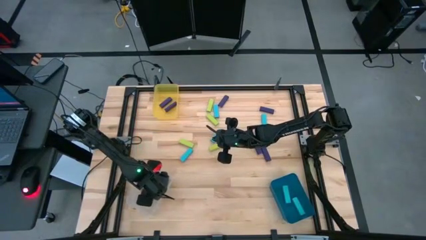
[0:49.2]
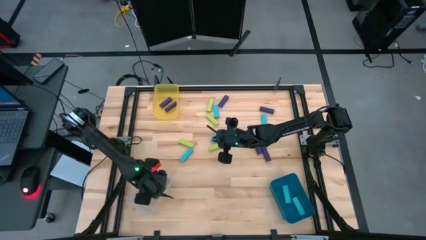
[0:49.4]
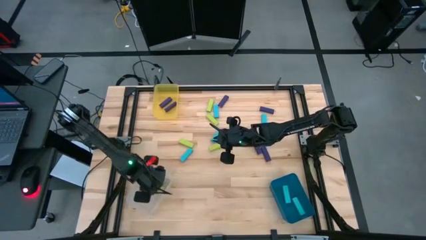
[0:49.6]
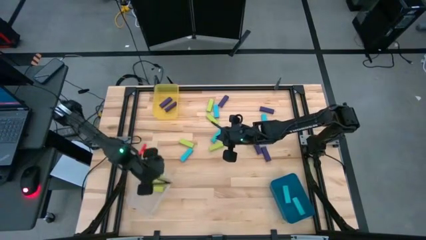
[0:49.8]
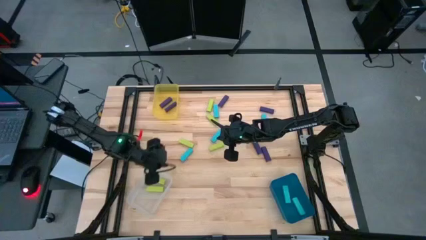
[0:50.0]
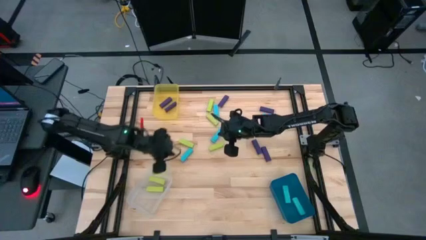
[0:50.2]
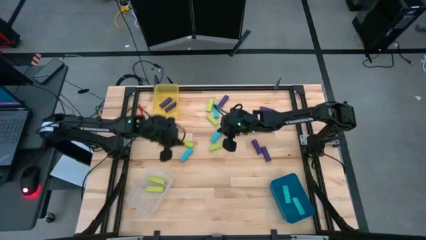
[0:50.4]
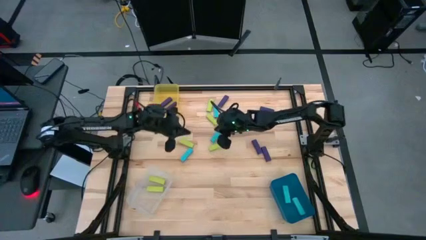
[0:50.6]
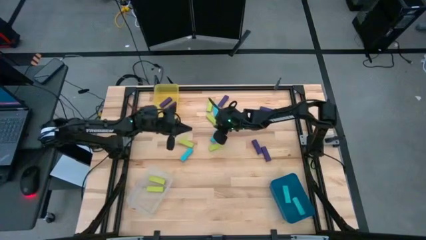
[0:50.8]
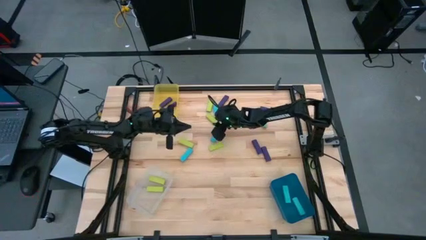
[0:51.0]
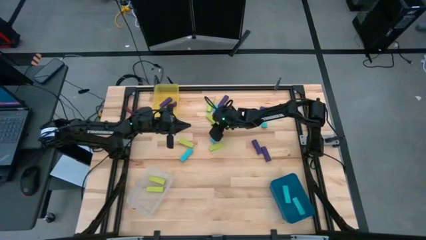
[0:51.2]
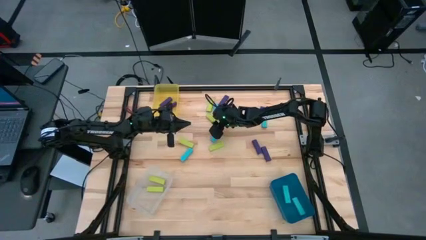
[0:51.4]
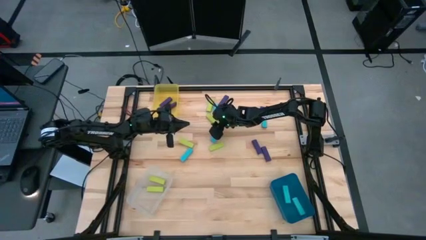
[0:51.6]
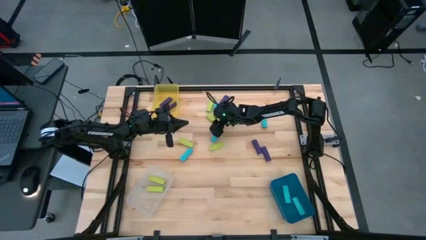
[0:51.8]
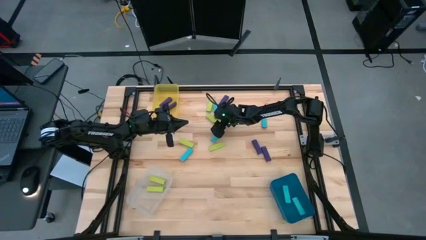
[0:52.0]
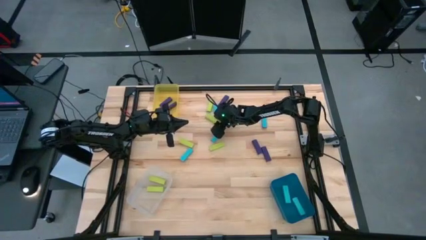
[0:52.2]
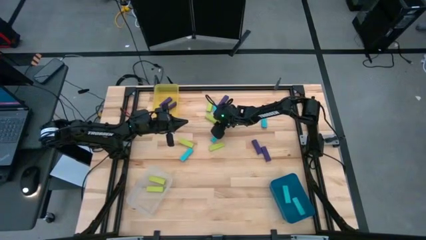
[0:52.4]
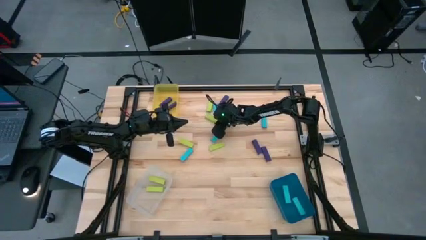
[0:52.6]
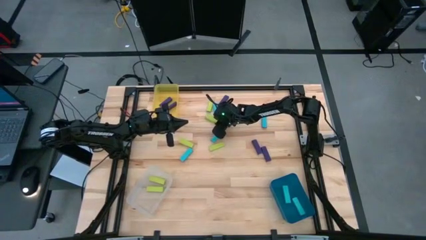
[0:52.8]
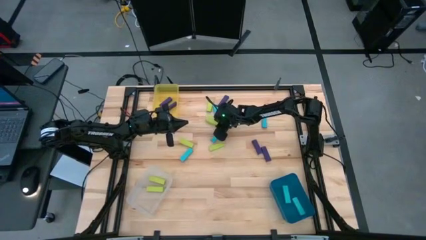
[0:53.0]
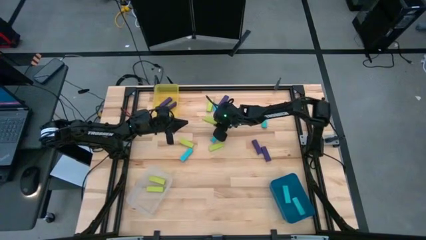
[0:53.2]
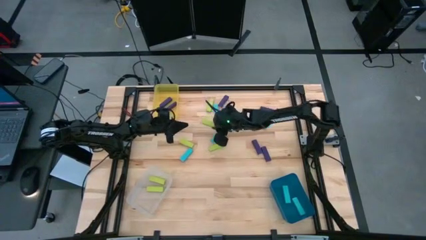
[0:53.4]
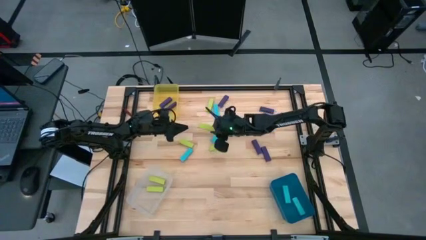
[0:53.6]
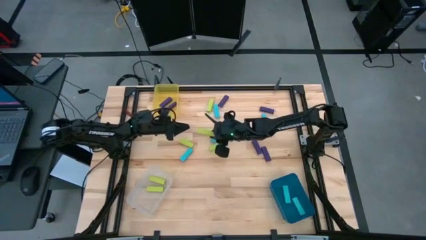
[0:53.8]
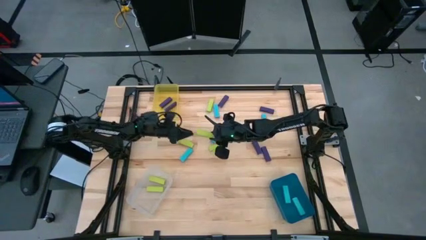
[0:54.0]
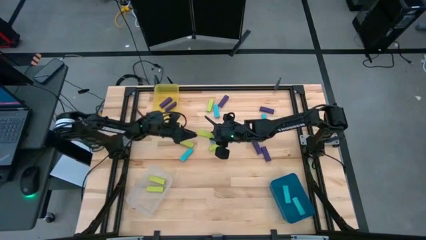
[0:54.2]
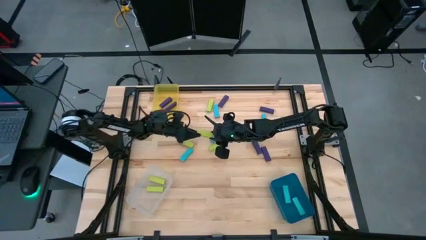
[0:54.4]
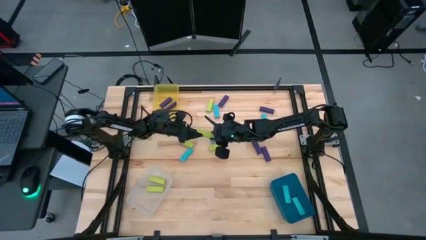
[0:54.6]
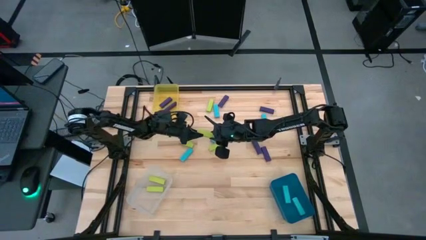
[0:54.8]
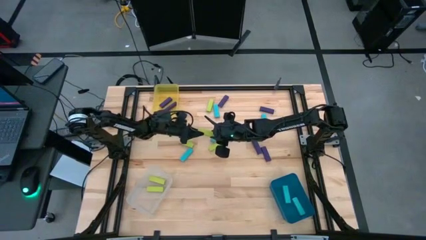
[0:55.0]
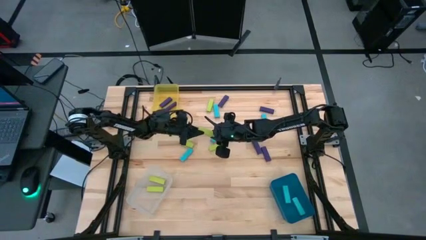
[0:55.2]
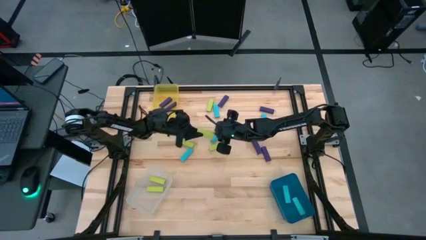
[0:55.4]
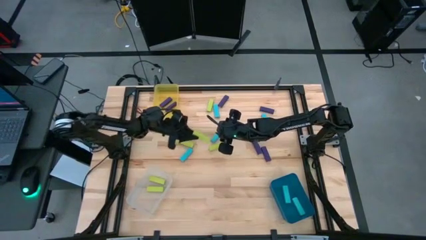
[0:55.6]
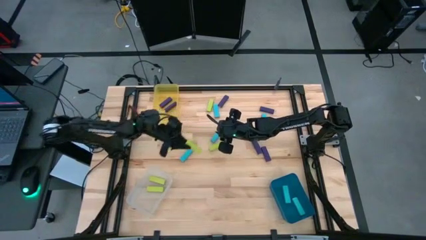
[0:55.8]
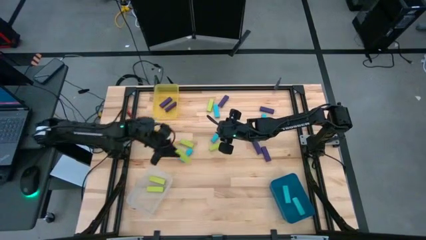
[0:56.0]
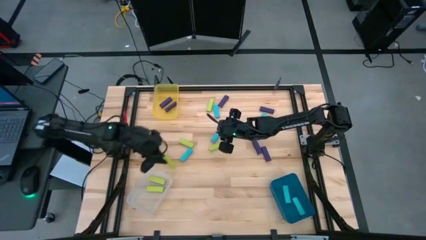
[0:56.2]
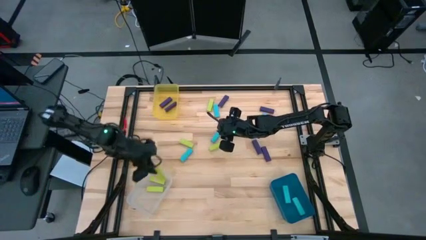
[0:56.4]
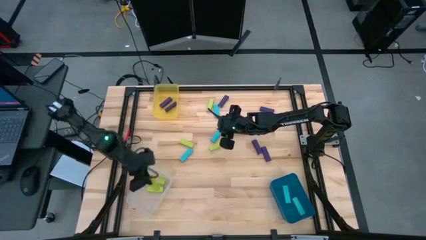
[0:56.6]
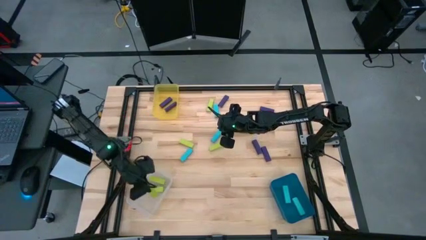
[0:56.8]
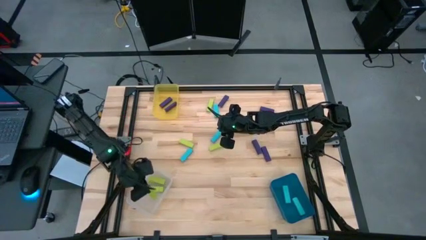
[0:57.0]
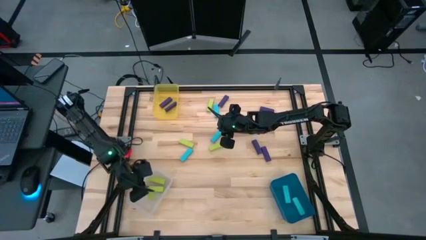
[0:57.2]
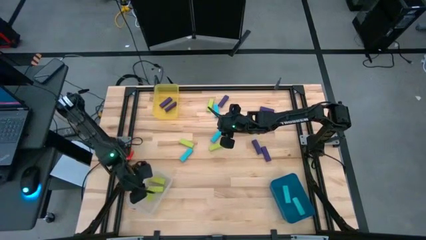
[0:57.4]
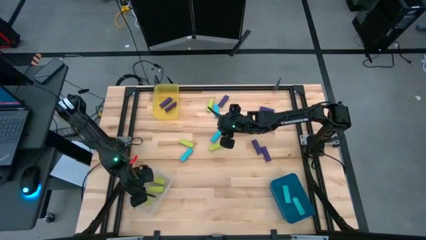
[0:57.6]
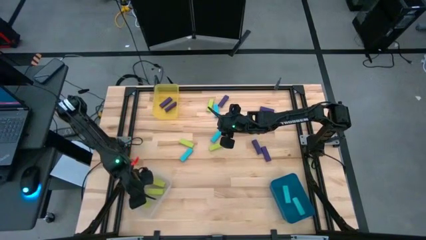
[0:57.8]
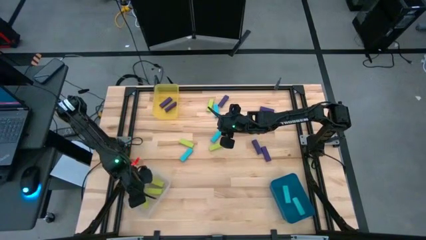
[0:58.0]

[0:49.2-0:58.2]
Task: Sort blocks
Put the green block into the transparent bin

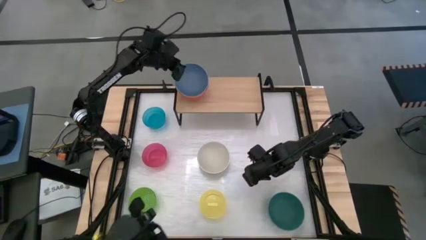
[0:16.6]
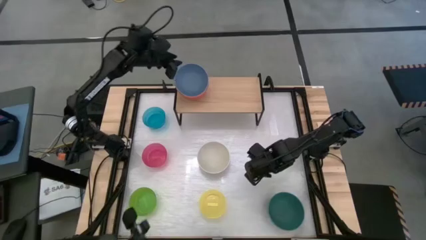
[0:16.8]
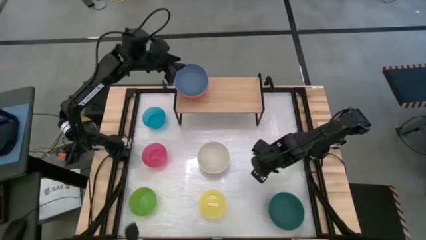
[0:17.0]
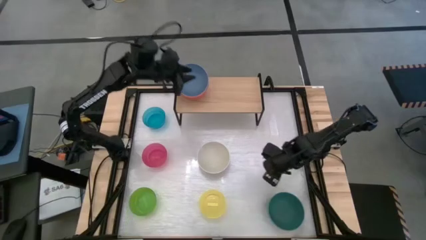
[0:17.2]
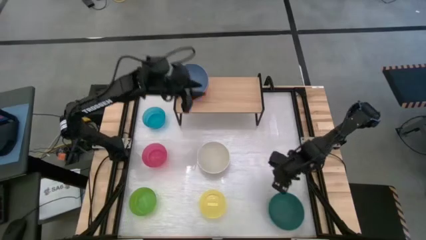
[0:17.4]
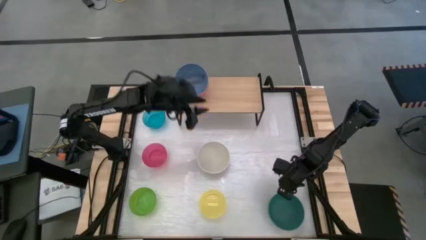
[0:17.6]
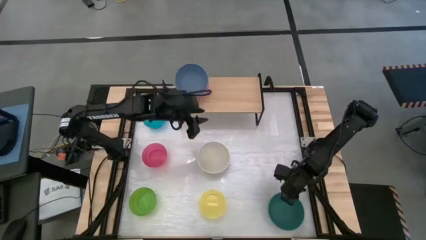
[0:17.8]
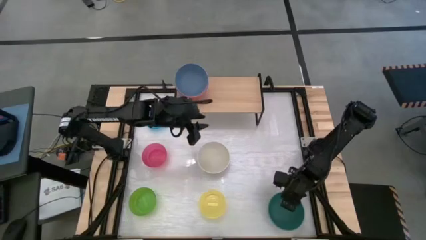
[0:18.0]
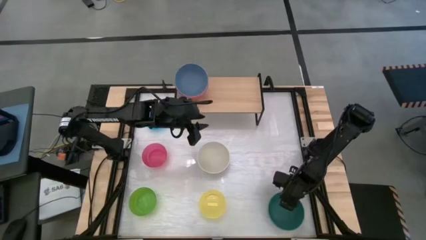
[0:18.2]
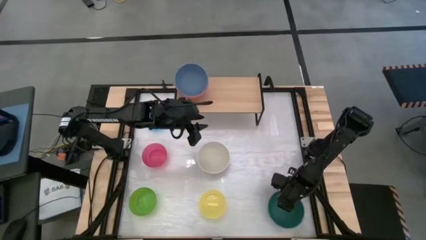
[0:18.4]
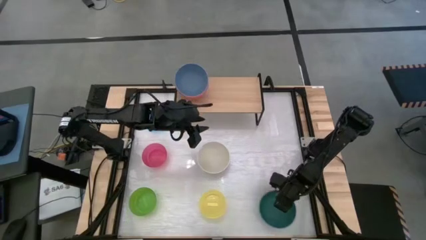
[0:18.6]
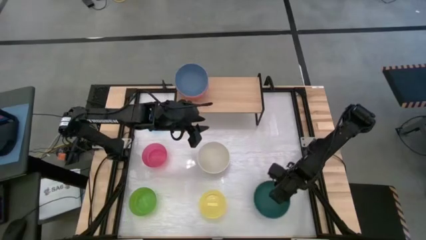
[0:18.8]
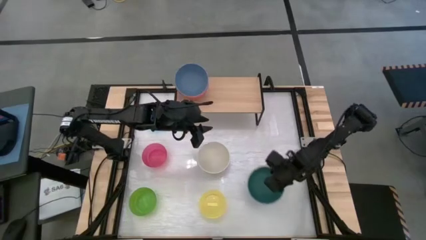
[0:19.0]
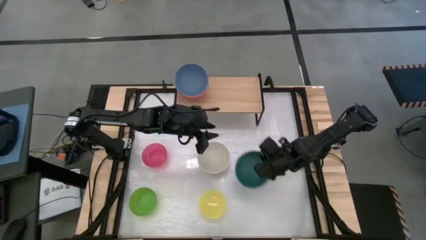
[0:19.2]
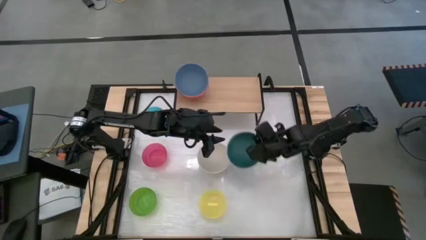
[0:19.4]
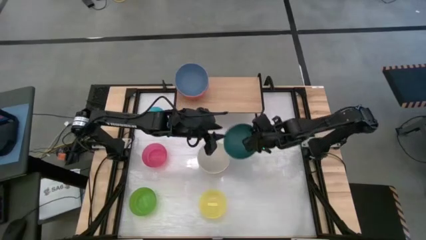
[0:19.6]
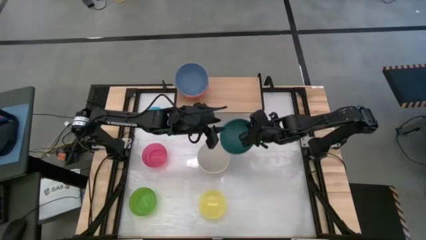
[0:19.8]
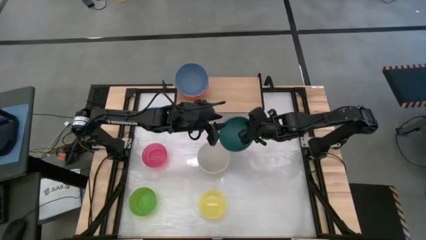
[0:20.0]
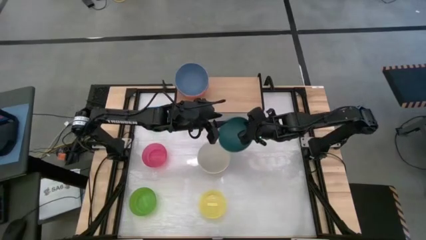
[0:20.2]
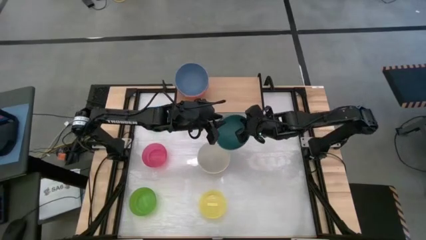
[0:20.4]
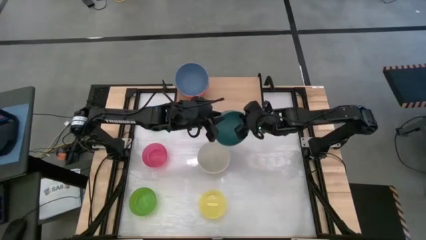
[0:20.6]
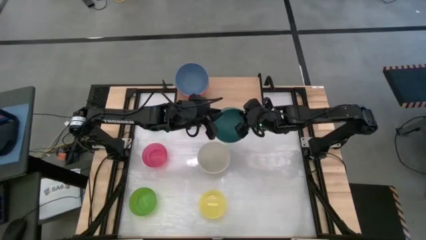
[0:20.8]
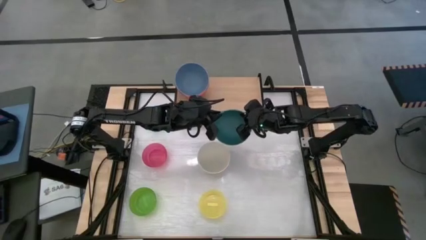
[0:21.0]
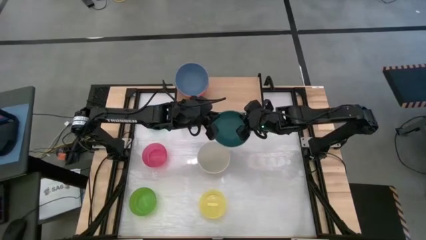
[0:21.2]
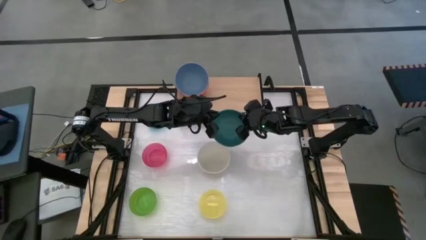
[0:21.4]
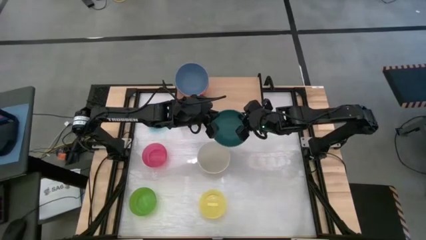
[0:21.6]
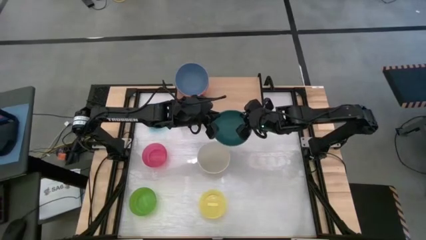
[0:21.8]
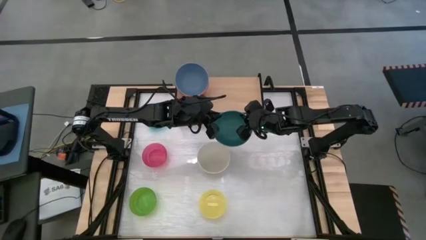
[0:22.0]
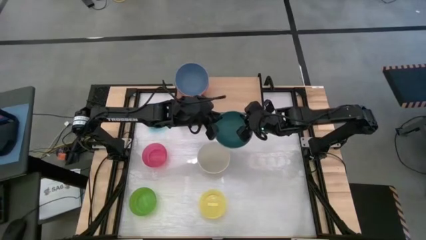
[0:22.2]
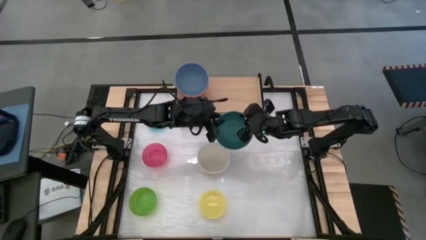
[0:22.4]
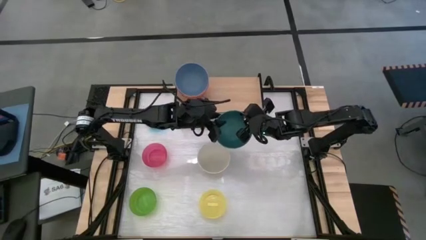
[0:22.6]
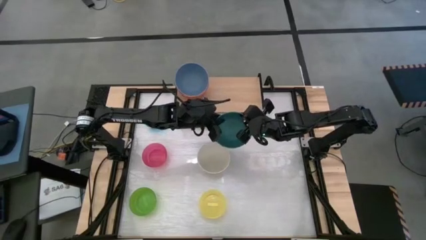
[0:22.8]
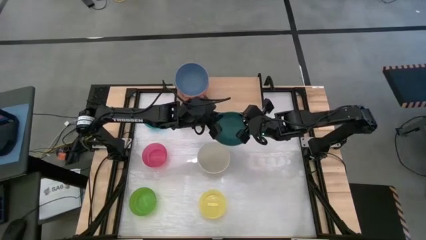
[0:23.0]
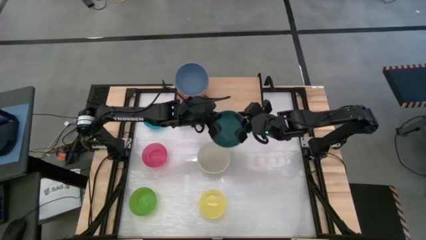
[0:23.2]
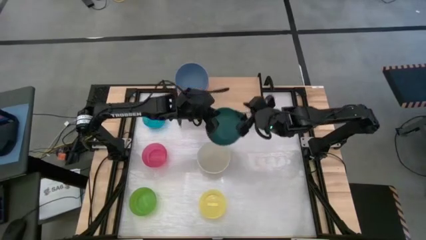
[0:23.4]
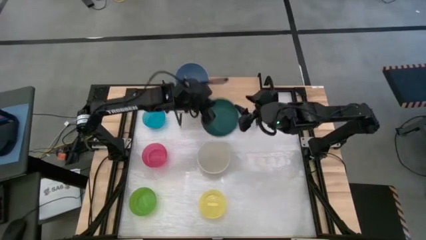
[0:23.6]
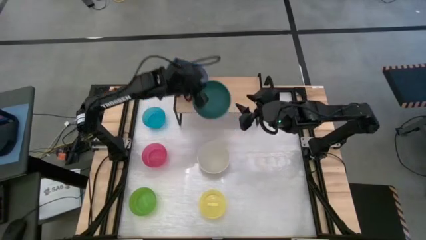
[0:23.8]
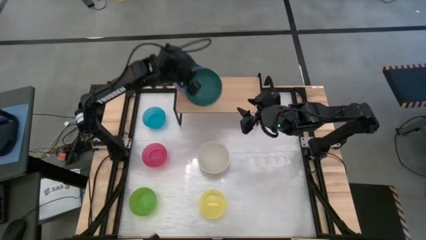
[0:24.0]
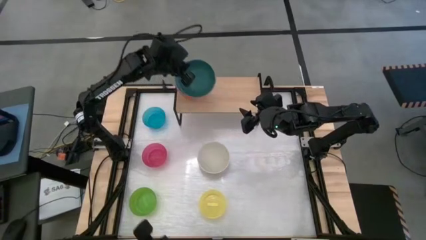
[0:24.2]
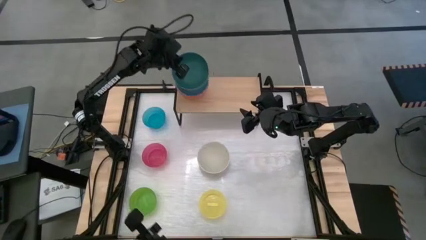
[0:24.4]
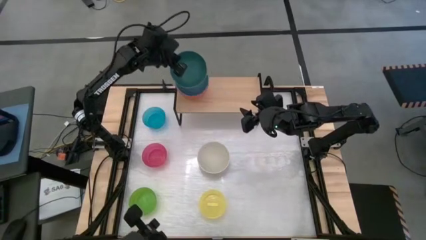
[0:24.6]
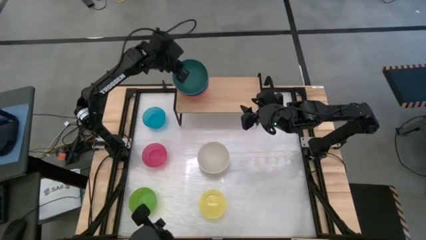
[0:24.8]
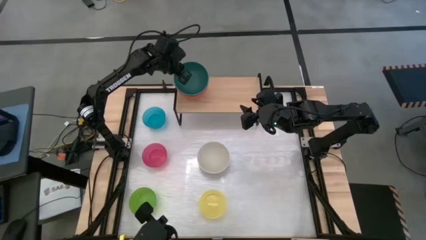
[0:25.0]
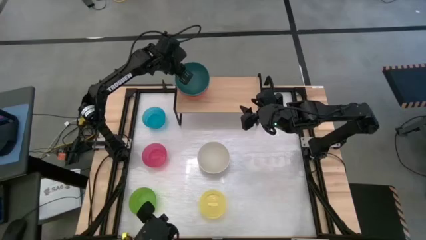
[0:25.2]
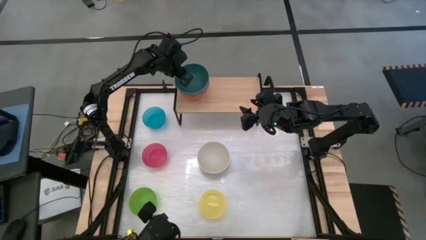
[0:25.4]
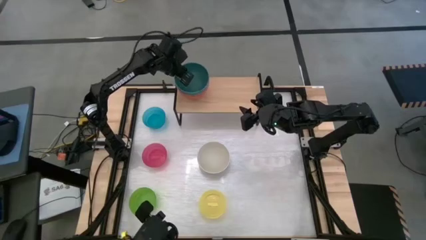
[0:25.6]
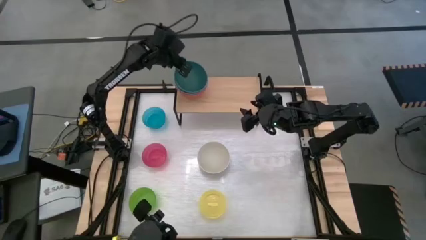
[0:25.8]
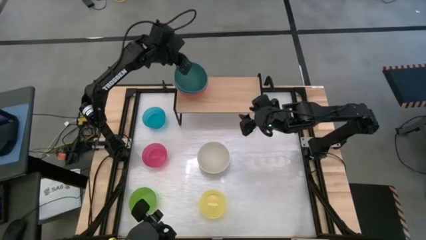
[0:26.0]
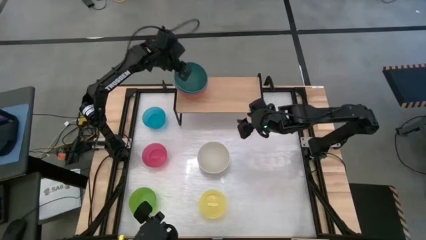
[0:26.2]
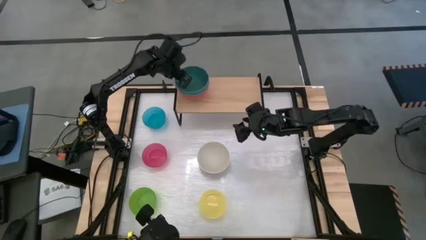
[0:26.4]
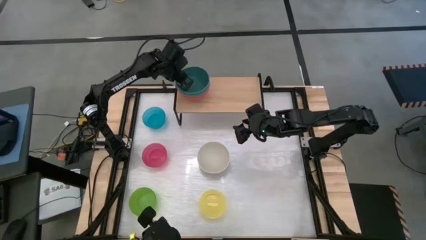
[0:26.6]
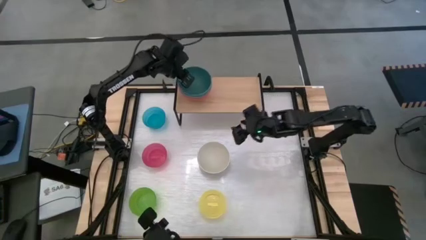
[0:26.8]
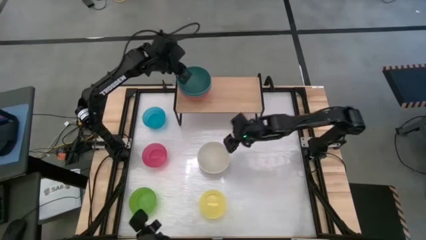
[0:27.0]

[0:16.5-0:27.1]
Task: Place and stack bowls onto a shelf
Stack the green bowl on top of the blue bowl on the shelf
